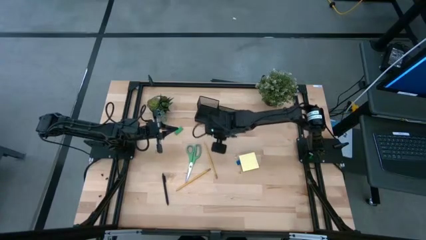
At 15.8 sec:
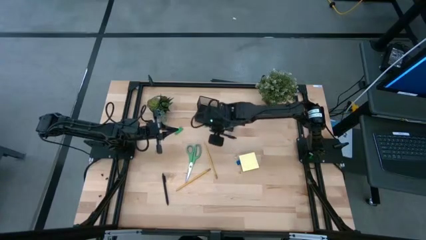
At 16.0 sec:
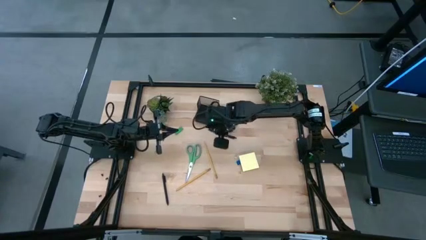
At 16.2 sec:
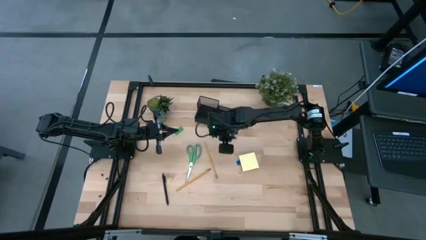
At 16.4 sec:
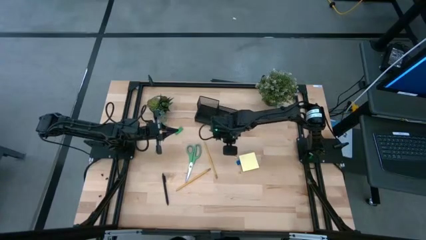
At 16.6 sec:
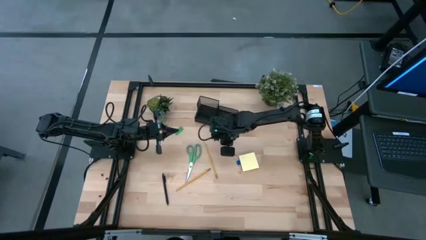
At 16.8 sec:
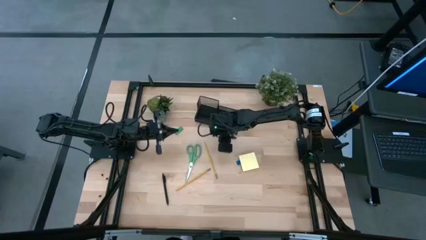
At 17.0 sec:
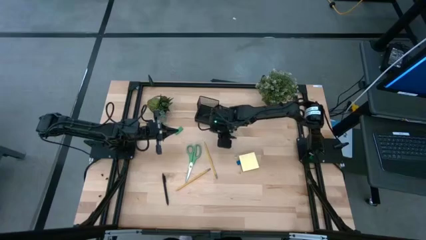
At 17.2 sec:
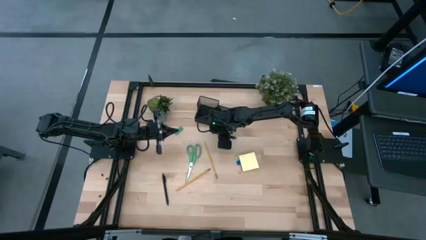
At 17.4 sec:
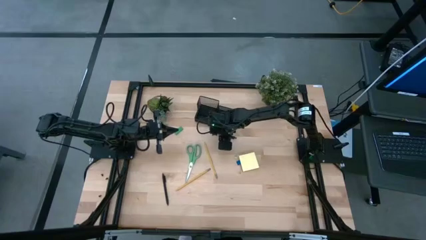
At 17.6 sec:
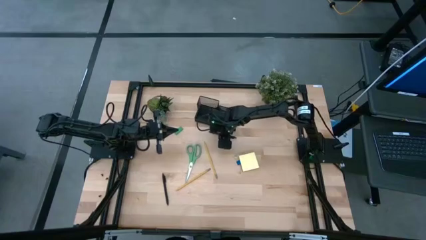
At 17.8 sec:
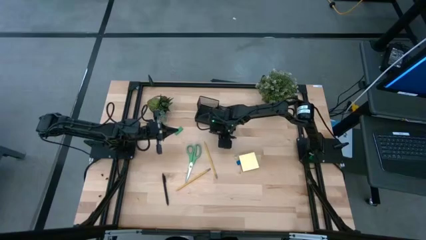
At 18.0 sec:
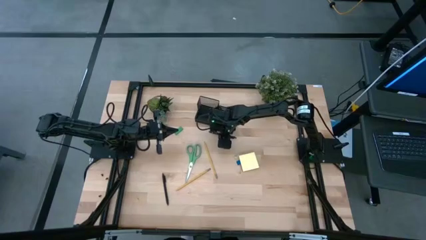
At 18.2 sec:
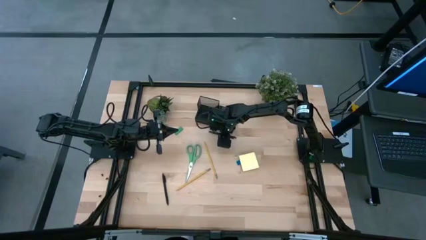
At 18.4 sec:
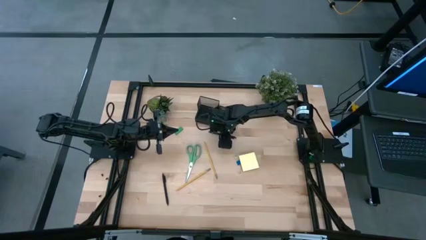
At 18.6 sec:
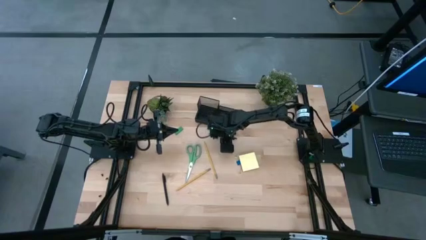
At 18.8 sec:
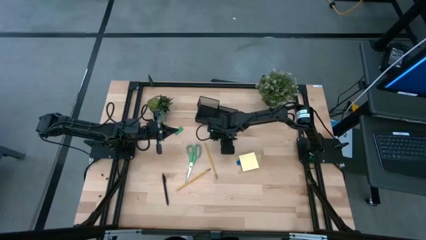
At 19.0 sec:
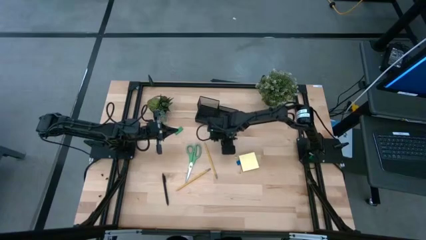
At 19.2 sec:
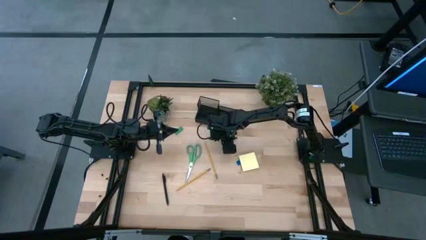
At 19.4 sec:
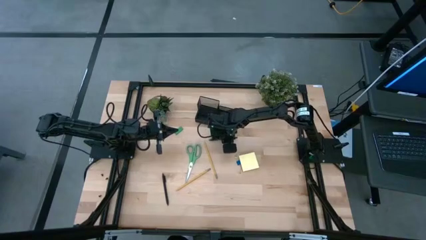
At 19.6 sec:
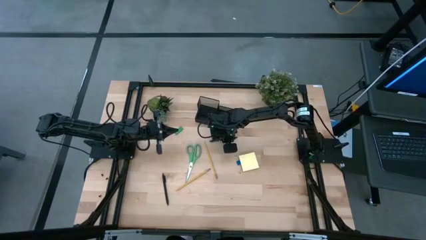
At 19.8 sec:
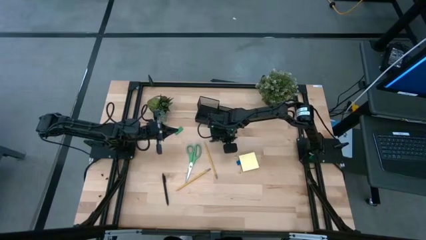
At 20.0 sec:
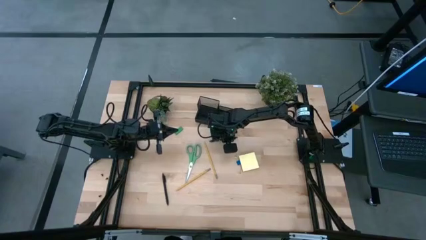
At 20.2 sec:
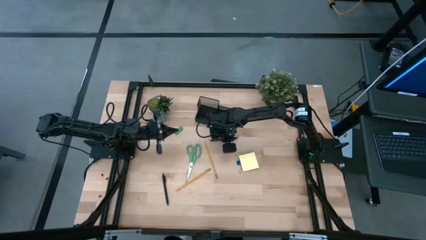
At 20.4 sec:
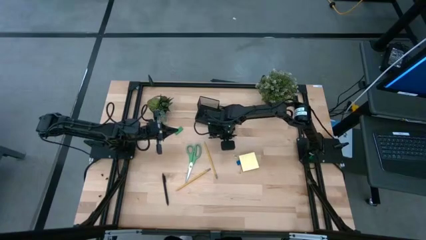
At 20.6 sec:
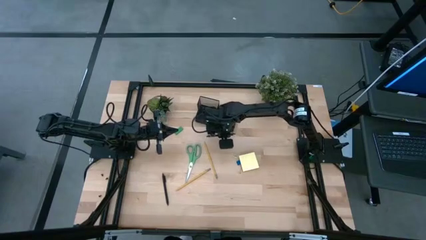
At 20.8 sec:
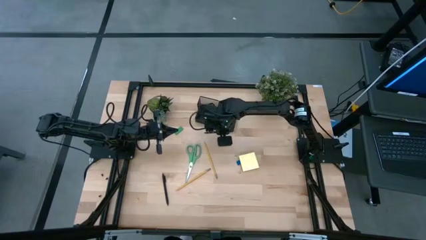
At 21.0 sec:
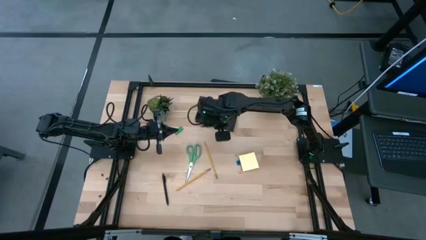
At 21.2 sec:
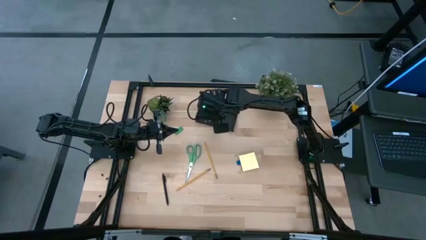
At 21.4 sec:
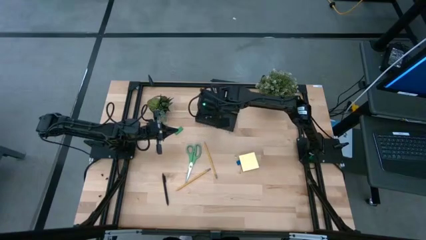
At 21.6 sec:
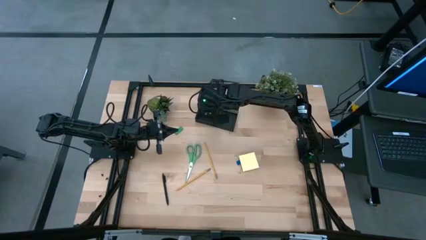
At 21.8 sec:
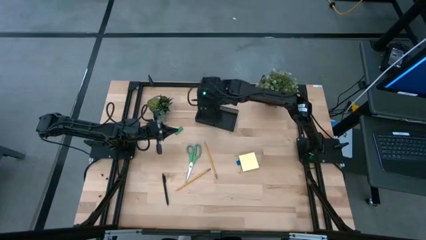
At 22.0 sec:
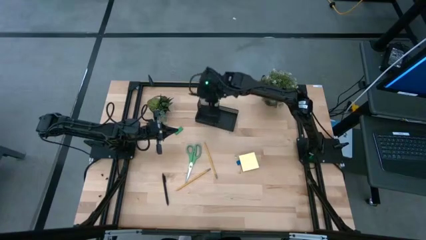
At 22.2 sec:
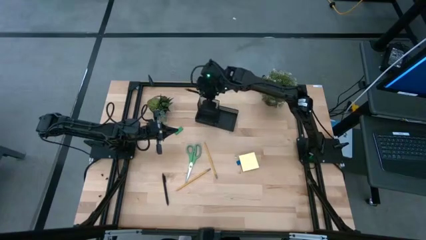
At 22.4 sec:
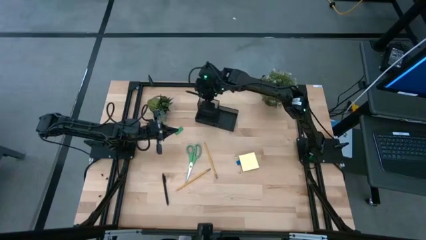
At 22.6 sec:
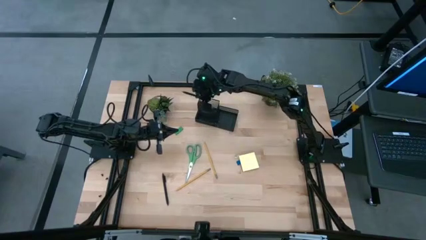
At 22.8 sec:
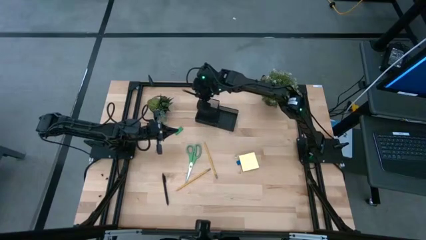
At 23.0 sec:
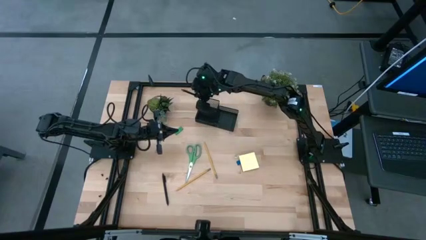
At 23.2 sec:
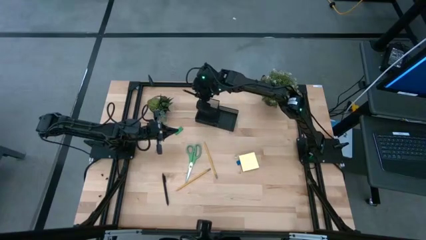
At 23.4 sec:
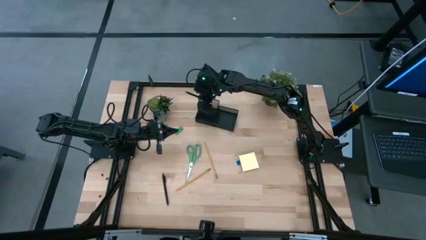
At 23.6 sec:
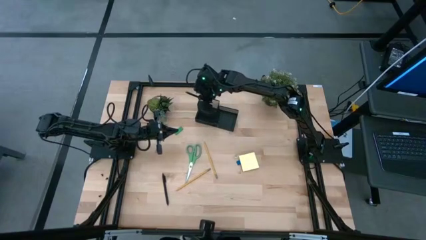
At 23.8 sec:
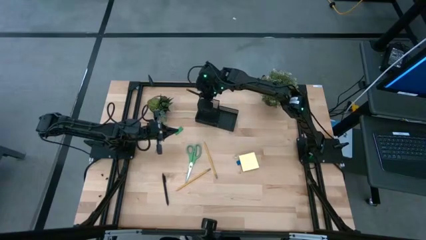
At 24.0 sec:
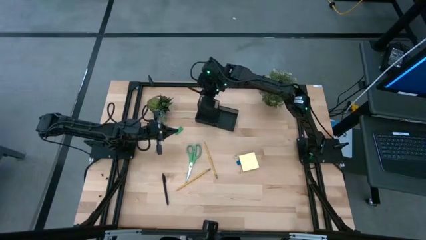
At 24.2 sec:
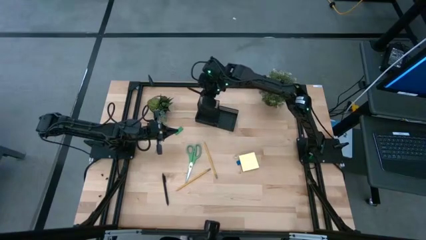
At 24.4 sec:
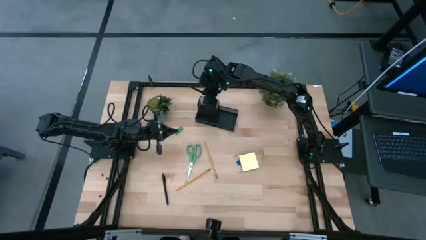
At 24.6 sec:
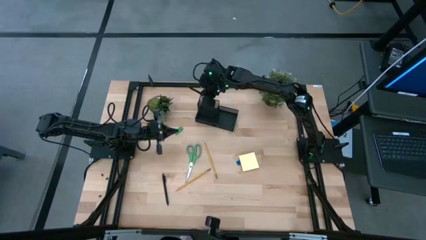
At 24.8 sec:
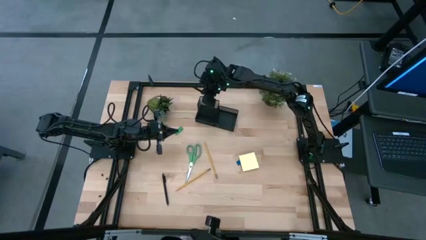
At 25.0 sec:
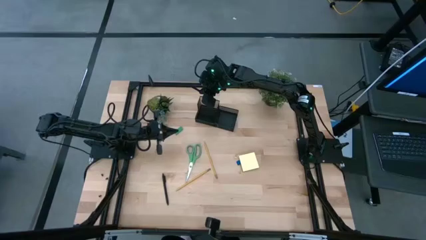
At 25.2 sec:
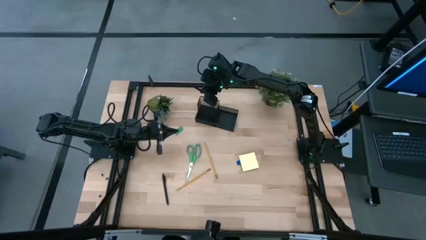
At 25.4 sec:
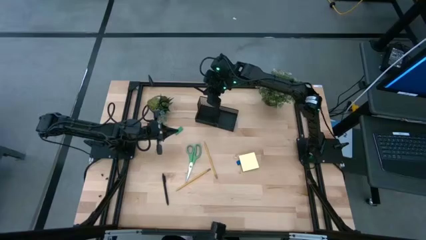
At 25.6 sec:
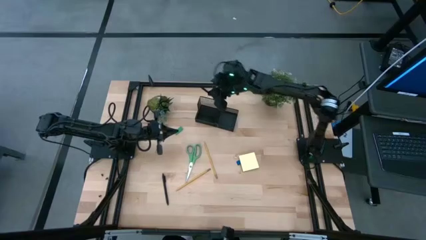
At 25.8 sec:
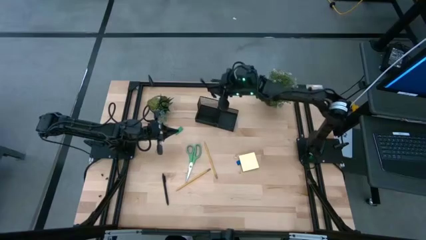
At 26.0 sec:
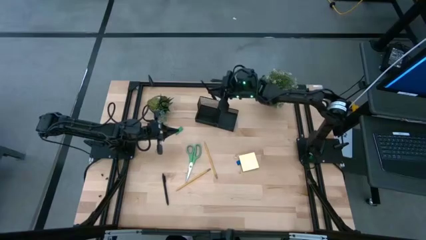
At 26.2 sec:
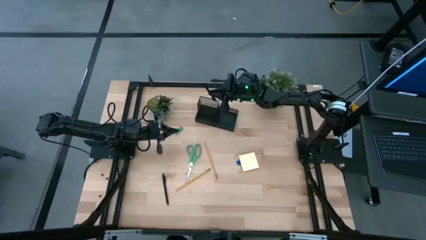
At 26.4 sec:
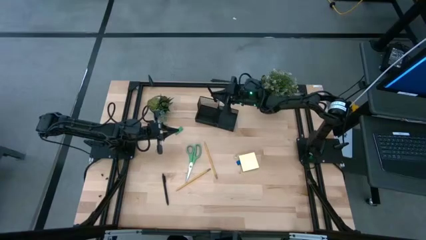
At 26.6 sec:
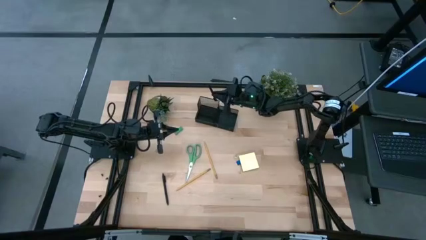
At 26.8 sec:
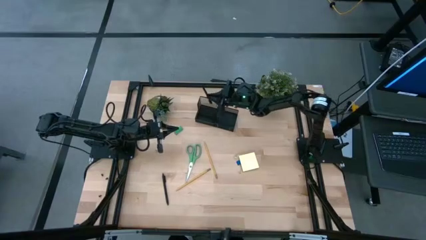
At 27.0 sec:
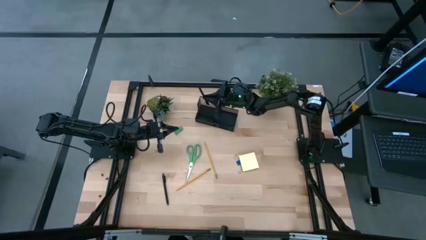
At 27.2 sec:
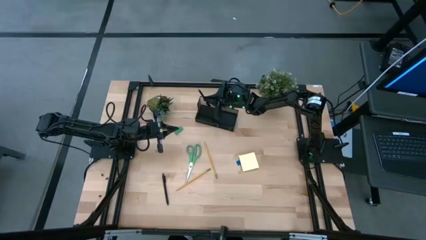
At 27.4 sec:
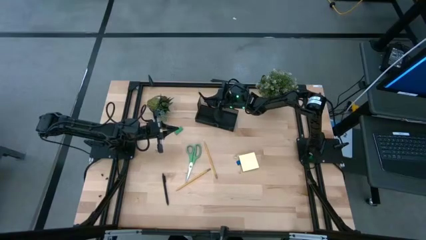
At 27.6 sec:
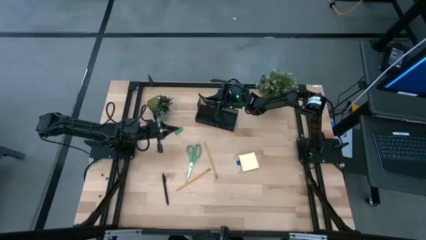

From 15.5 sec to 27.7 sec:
Task: Pick and place office supplies into organizer
Put the top pen into the desk organizer

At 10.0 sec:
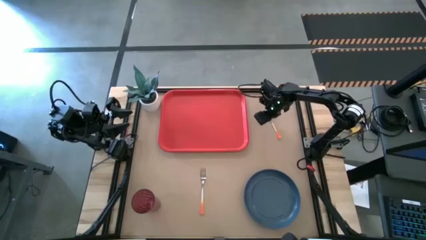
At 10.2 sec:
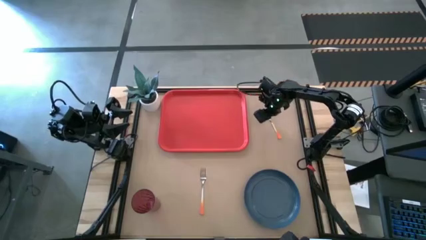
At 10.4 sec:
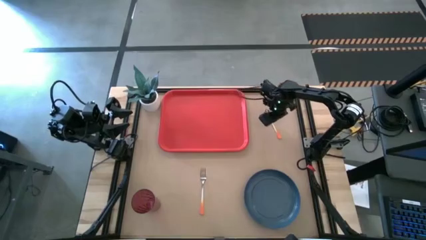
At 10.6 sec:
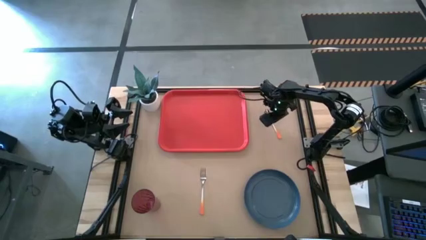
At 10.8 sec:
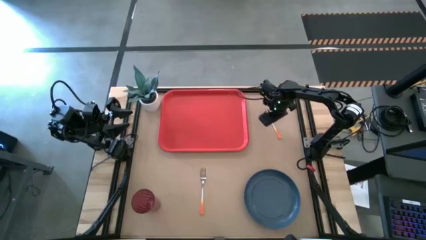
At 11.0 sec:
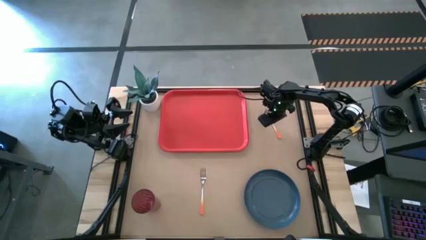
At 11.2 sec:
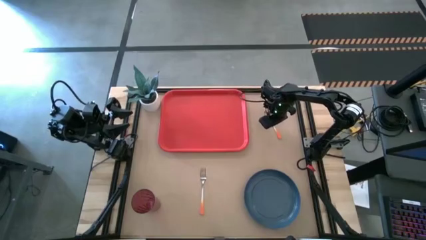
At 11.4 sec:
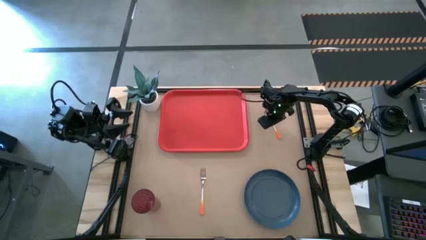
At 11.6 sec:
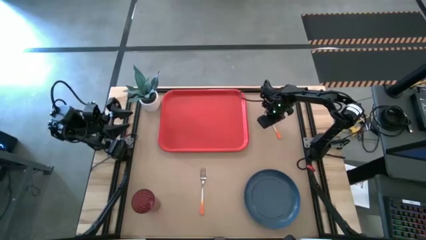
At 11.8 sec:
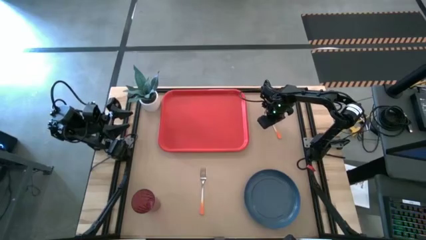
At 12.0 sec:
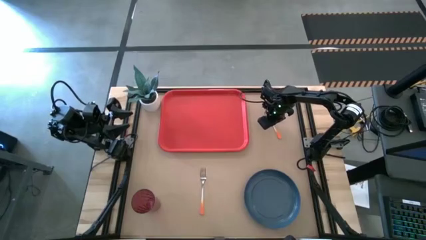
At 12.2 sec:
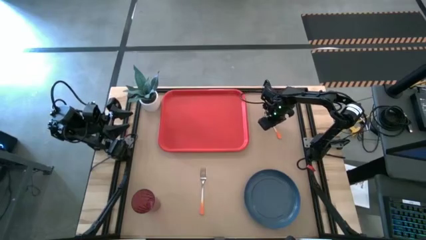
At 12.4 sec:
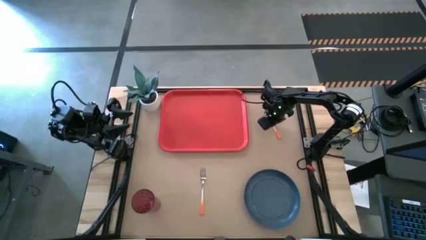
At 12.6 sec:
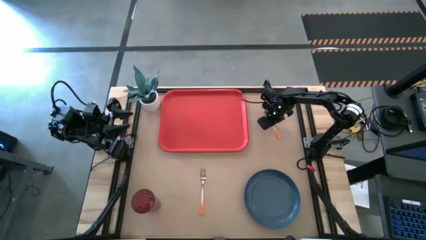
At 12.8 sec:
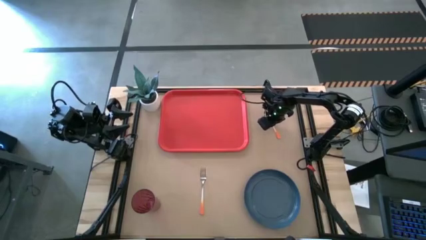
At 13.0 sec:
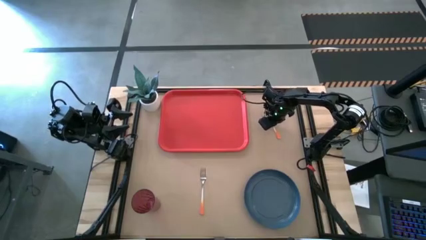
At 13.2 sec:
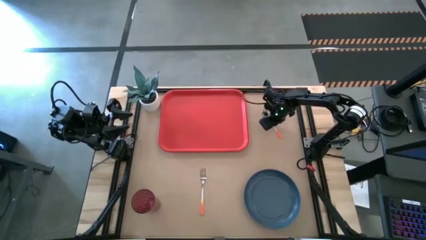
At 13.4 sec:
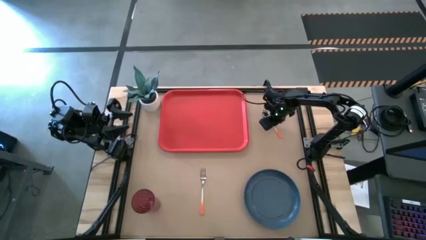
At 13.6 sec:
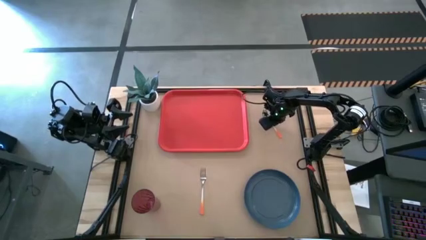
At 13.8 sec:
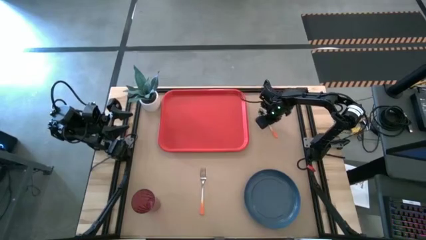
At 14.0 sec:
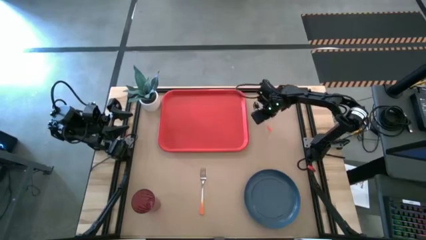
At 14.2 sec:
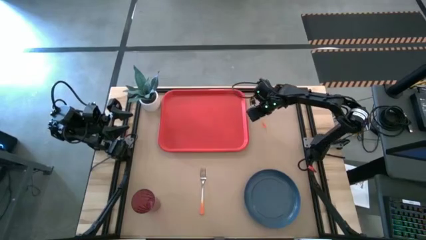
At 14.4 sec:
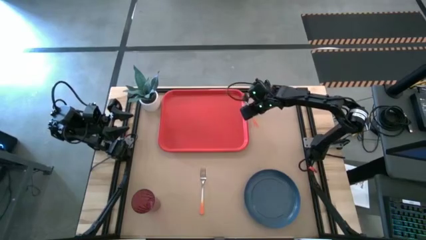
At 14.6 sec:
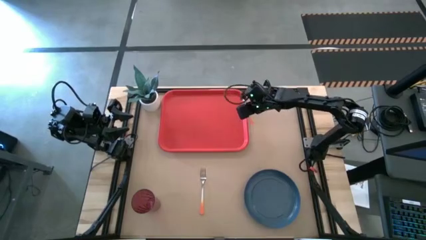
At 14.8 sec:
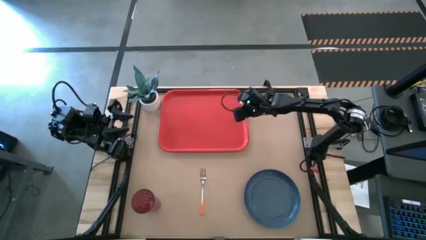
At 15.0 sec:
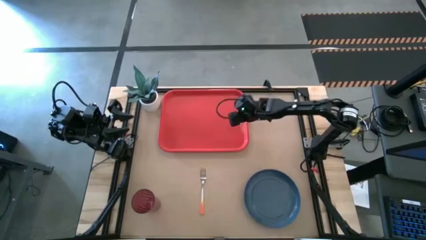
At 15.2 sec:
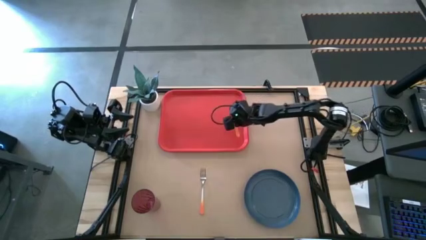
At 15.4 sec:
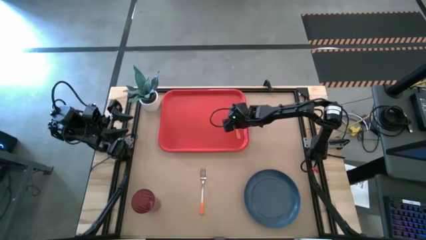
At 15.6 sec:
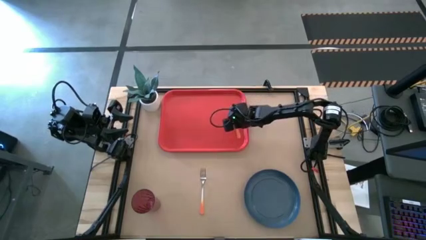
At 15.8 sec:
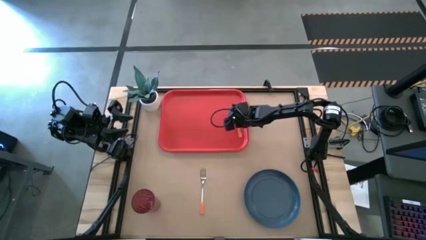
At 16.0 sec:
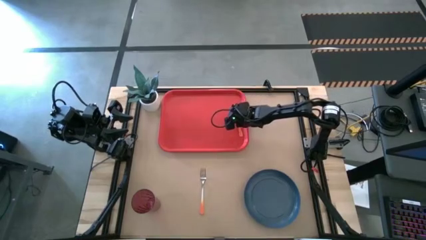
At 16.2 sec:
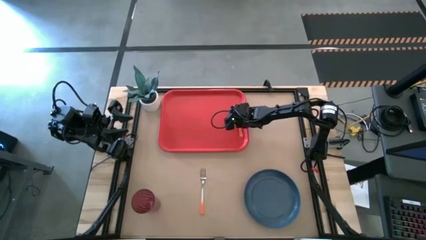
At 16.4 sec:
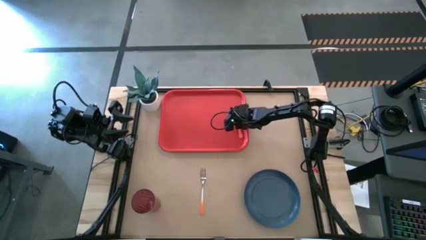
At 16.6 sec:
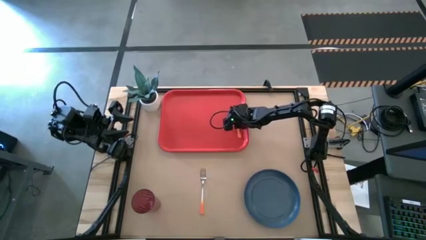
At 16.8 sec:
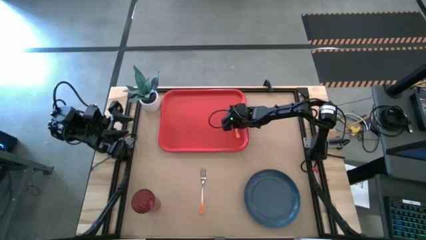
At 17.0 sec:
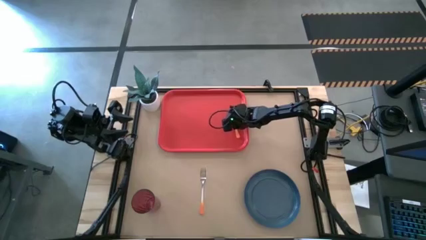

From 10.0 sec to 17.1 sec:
Task: Pick and place plate/cup/fork/spoon on tray
Put the orange spoon on the red tray
